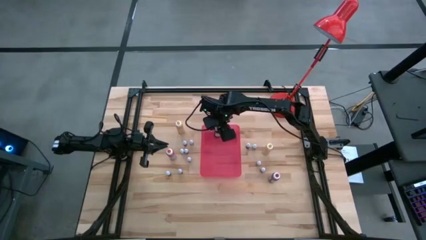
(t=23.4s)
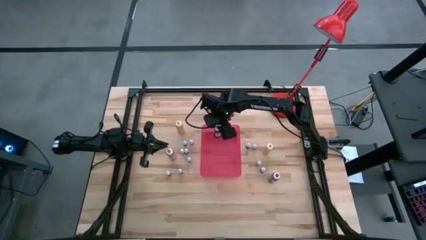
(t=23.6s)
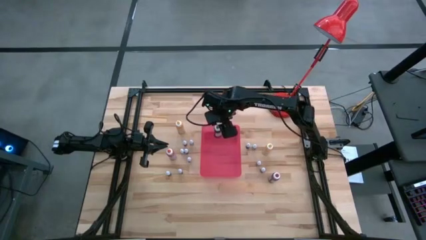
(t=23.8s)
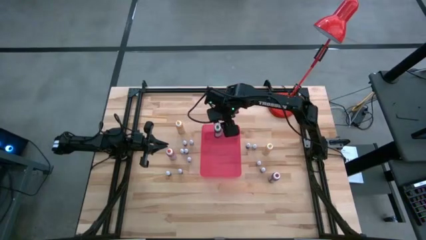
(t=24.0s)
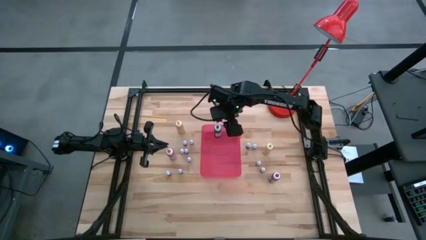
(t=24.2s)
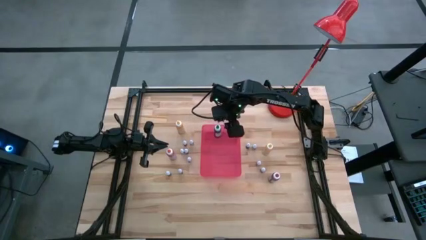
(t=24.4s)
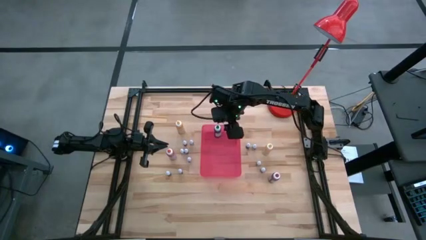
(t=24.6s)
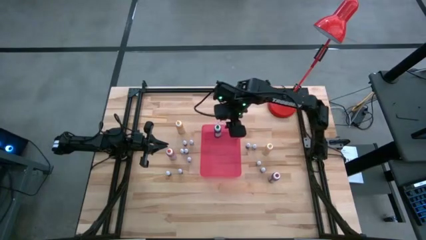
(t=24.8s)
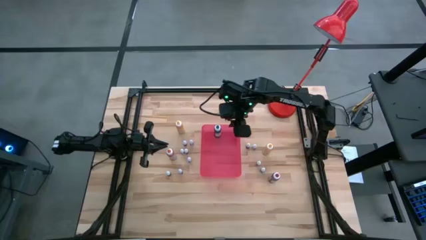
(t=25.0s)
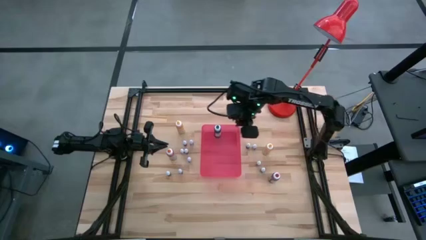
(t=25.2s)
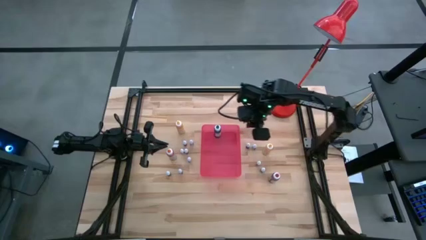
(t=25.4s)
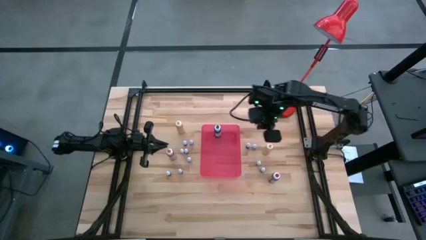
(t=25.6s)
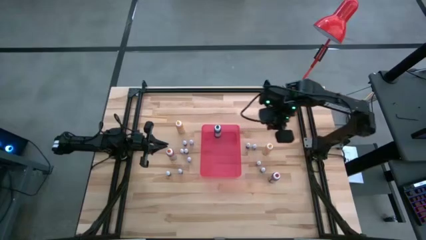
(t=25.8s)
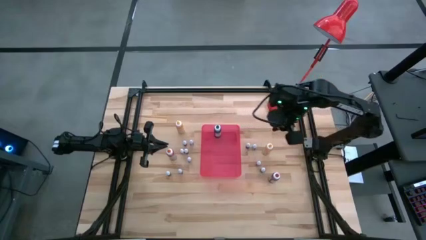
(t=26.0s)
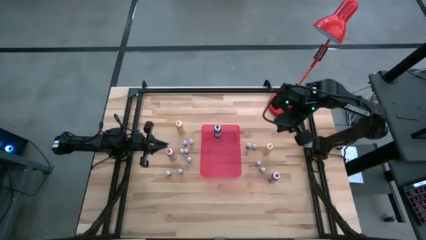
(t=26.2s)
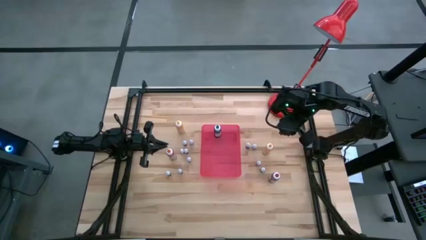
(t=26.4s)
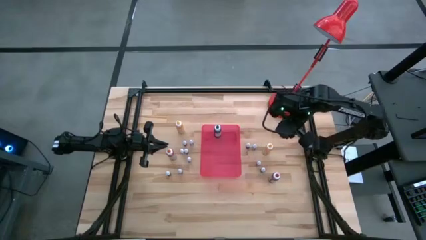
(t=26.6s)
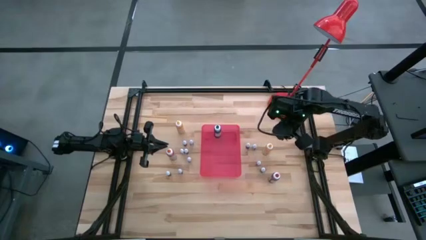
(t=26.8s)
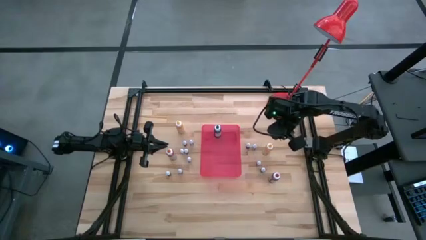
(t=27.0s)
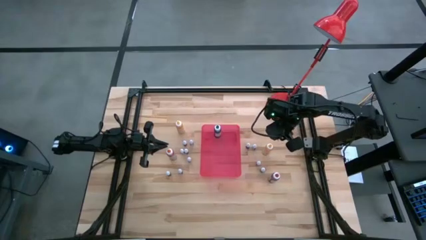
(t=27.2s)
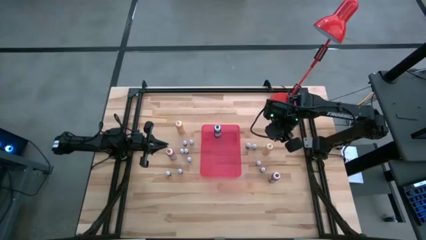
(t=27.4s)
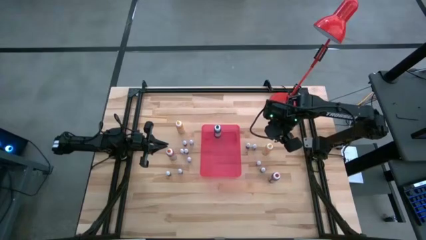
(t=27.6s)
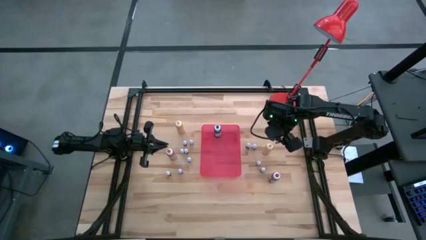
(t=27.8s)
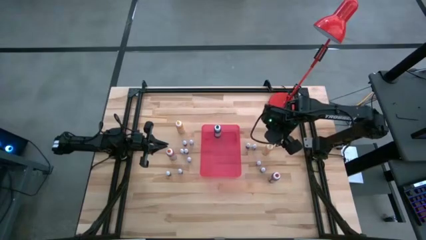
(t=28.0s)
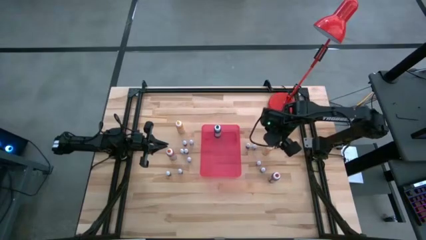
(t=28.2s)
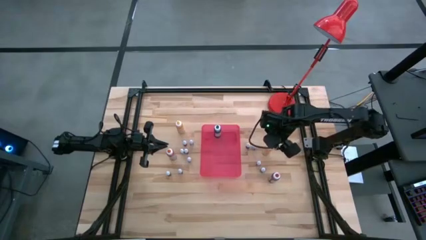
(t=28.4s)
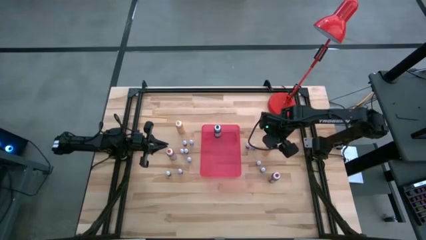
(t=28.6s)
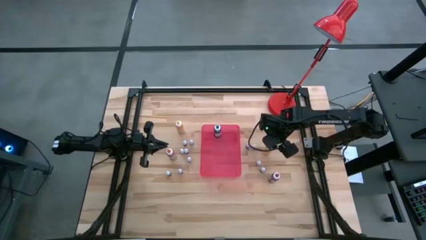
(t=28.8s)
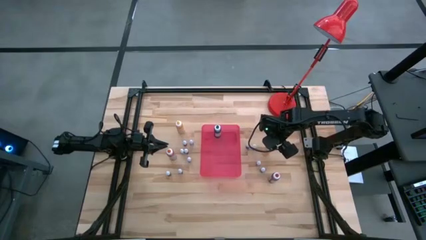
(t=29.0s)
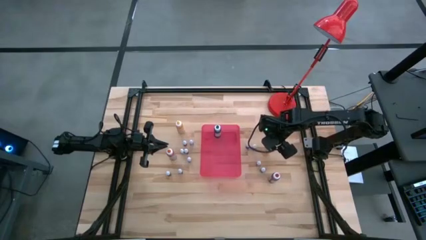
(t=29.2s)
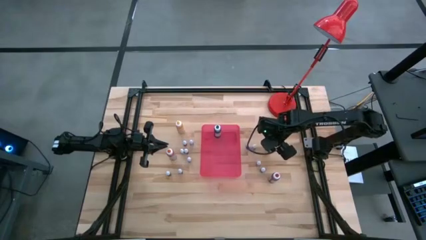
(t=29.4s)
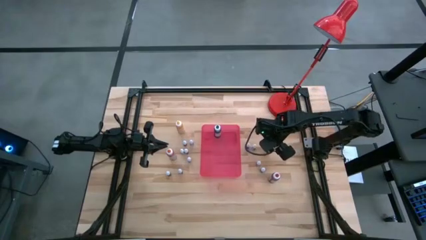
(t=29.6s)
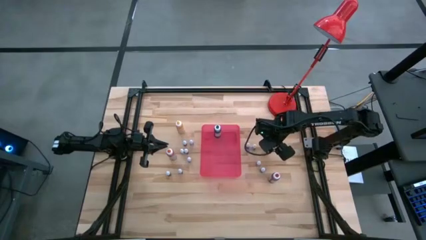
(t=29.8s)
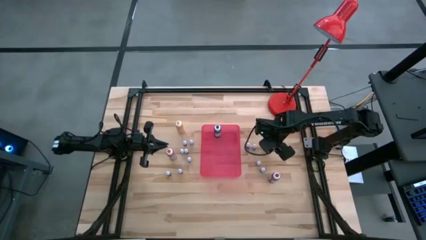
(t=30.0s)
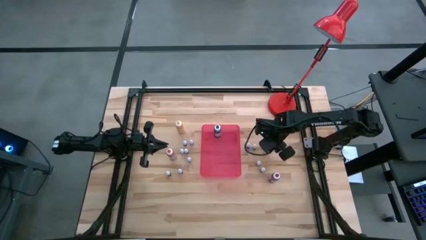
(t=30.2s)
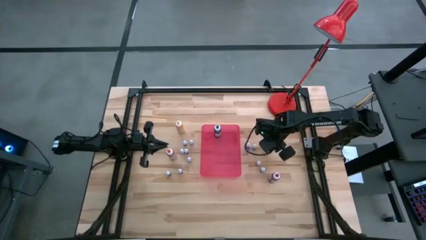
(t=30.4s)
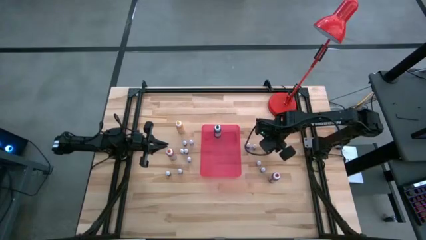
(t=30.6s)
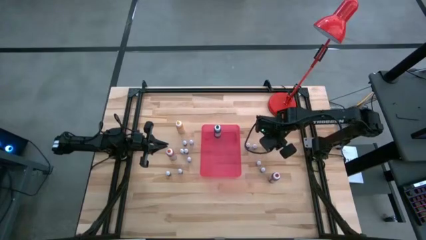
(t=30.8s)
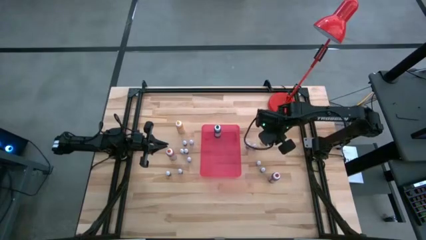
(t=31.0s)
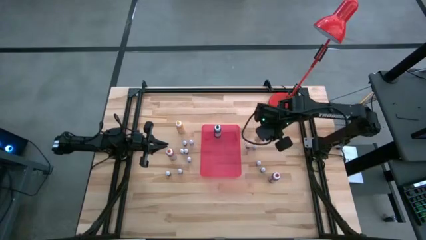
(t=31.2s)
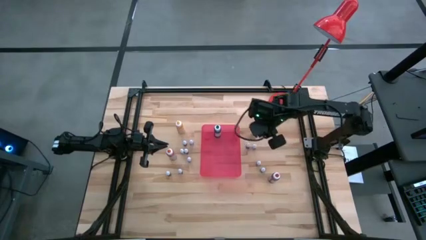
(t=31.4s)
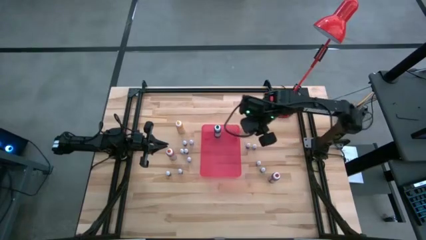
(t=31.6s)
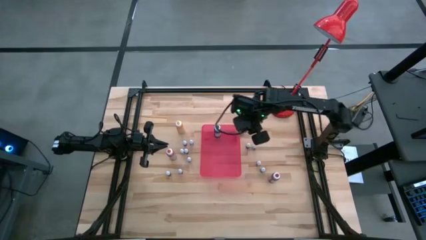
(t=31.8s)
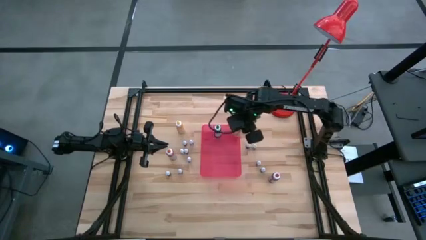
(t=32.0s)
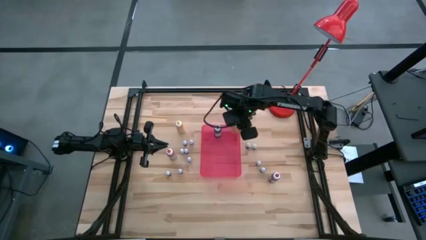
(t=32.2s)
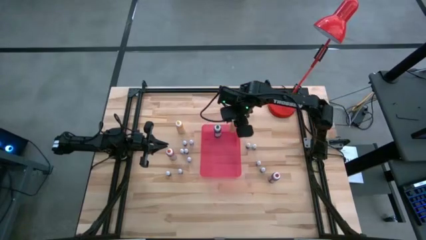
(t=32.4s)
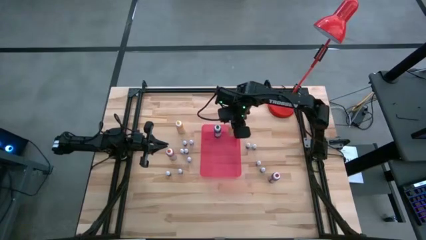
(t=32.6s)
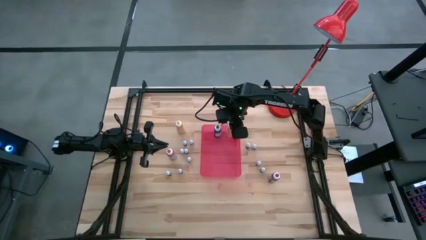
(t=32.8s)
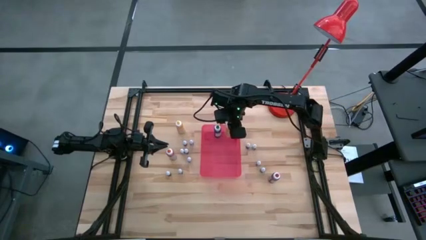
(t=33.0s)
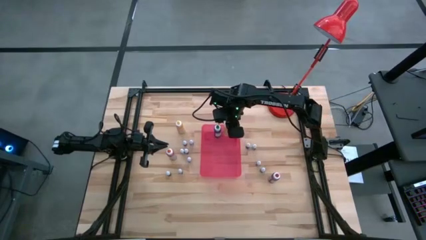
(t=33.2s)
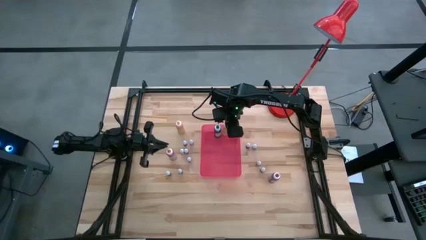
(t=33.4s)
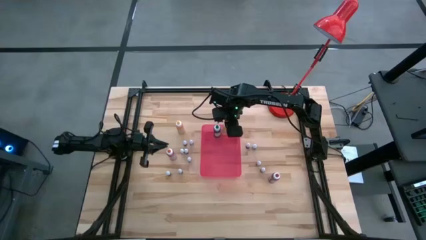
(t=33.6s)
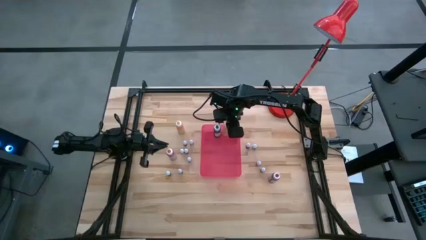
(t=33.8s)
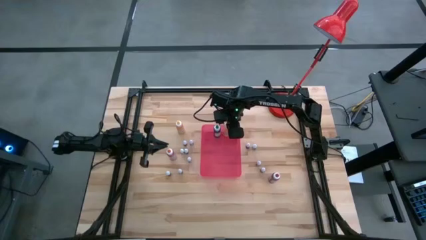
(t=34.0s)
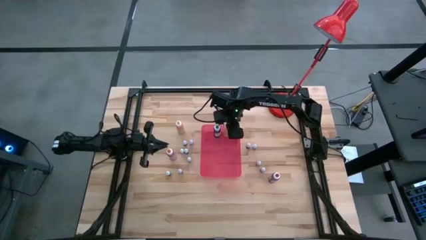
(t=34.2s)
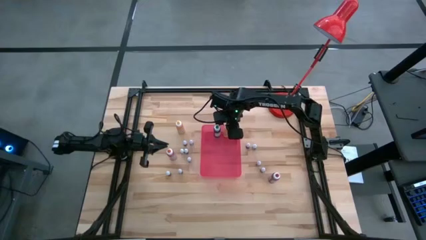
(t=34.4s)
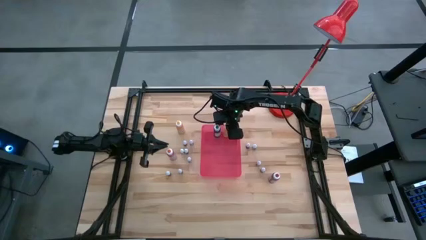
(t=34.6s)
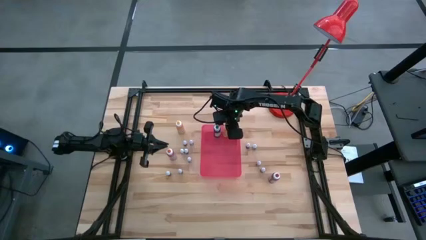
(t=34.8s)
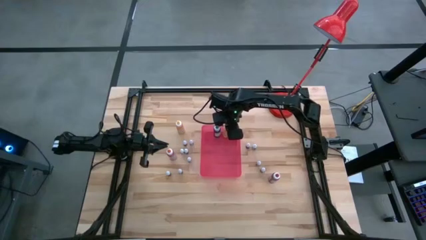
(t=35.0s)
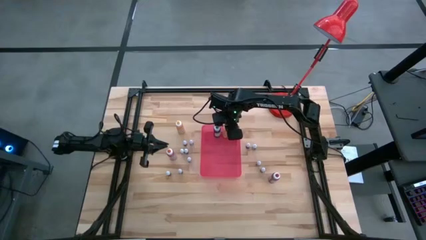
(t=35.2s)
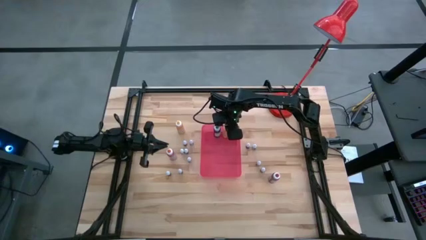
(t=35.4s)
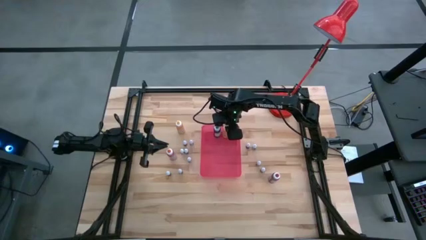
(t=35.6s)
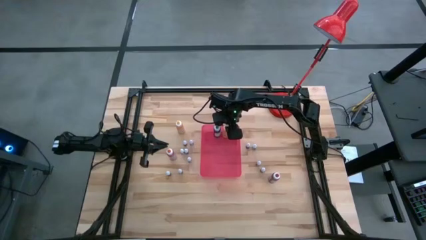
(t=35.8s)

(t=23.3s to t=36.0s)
Task: Pick & Place food coloring
Put the large yellow food coloring bottle into the red bin

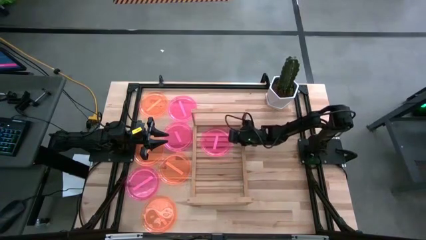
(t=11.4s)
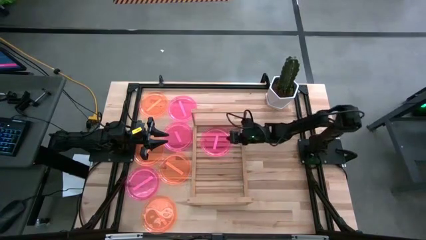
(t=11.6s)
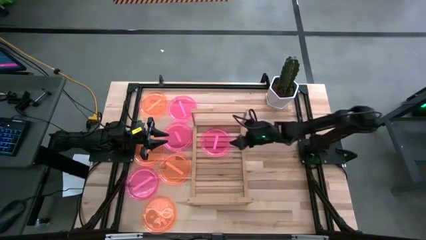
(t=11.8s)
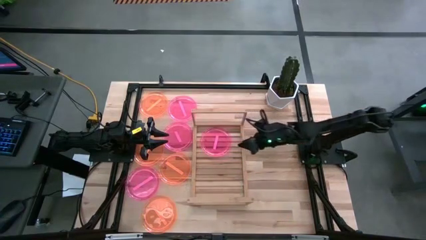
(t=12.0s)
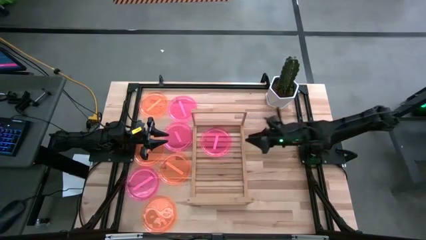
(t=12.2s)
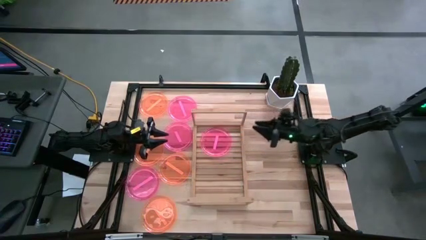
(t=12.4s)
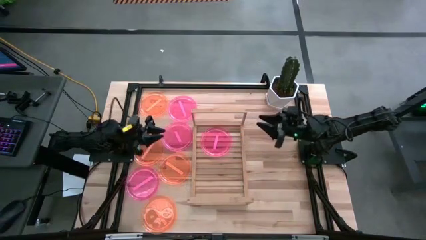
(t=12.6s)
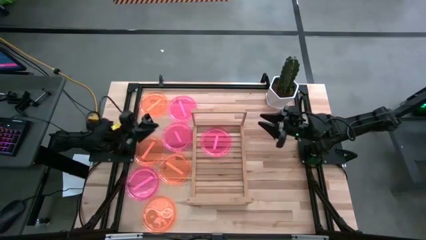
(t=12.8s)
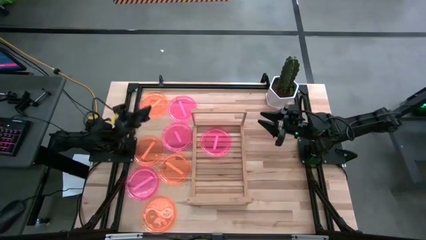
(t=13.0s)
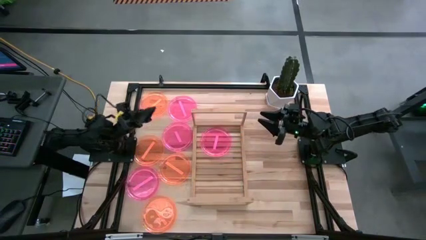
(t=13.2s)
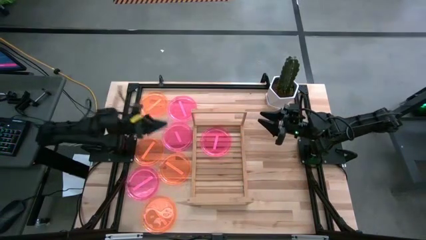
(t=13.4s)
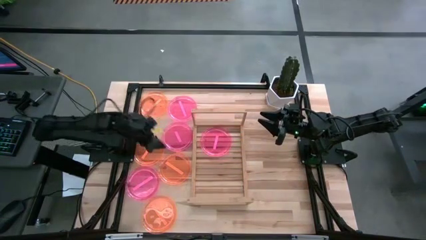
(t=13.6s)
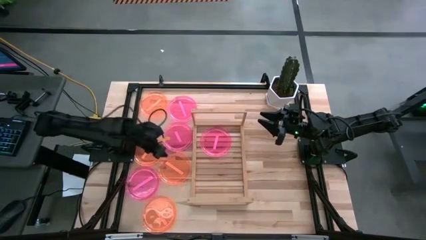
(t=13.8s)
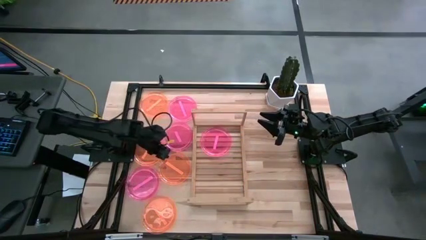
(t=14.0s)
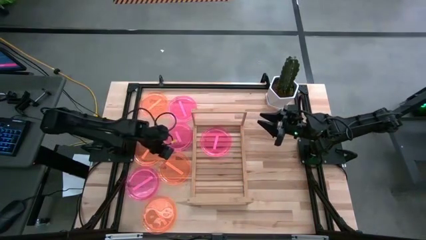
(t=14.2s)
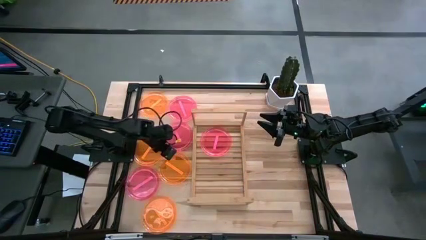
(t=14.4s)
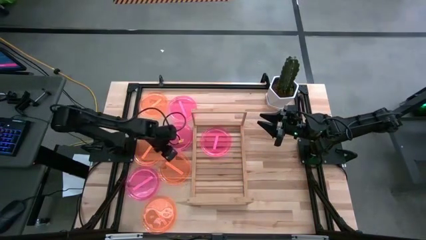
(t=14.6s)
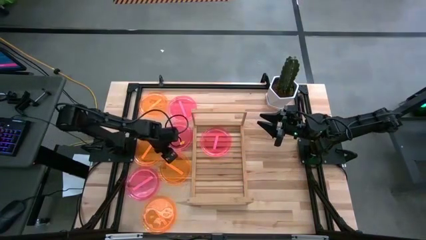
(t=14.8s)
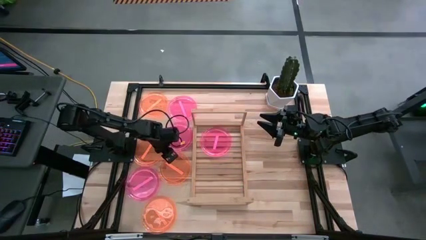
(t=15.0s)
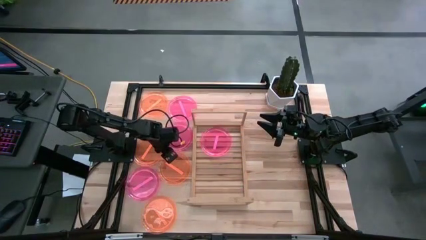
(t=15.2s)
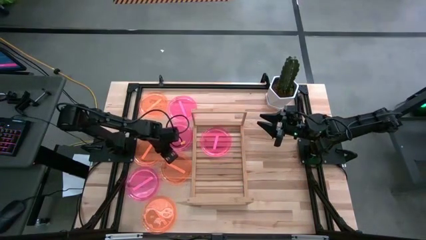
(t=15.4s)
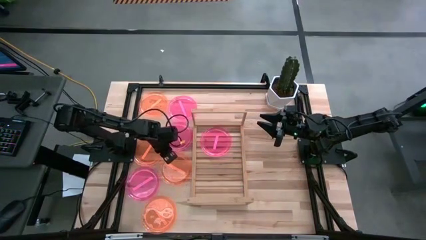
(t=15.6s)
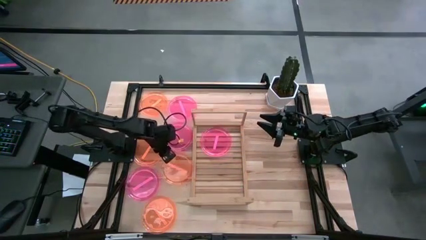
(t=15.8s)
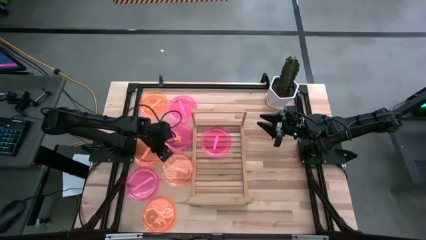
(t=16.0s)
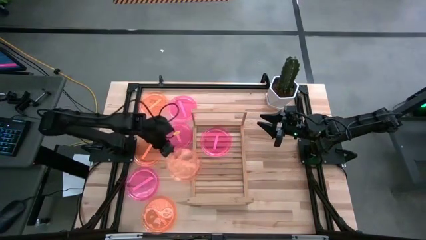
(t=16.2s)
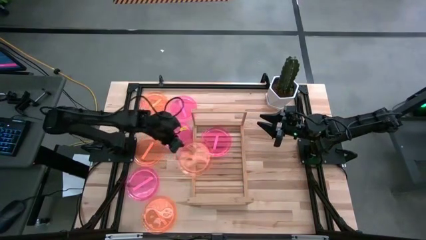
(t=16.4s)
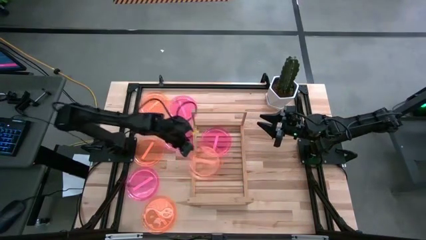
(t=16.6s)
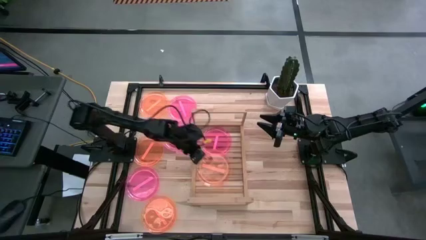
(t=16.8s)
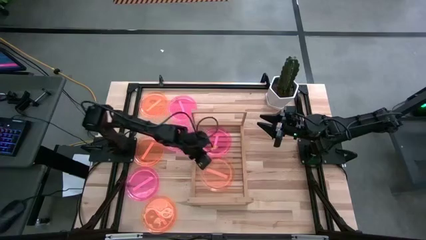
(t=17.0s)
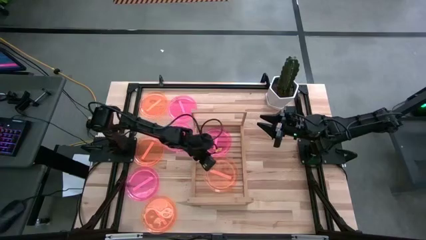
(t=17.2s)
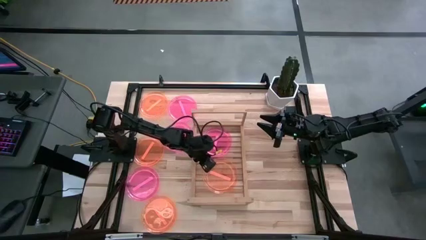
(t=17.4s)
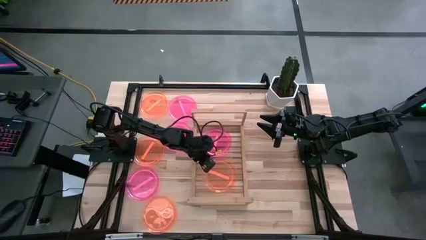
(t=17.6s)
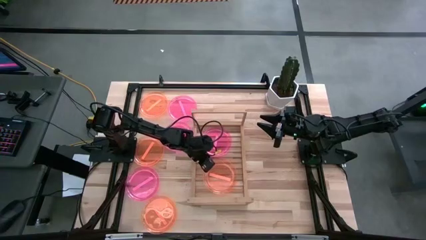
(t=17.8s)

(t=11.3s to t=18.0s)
Task: Place and stack plates onto a shelf
Put the orange plate on the shelf
